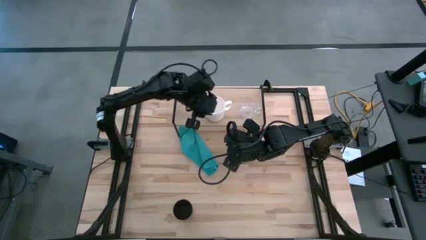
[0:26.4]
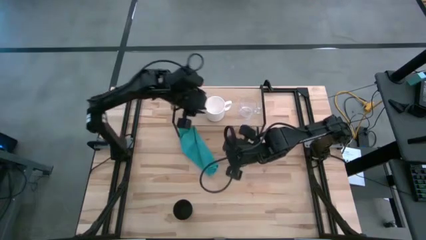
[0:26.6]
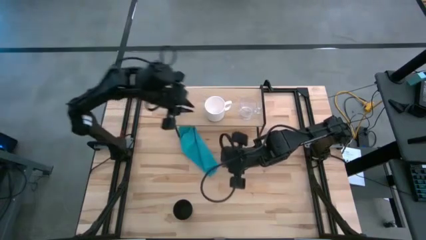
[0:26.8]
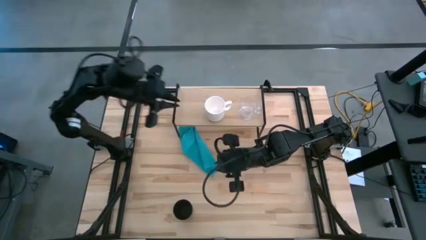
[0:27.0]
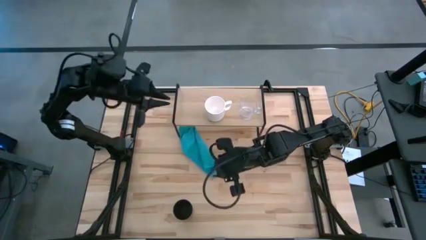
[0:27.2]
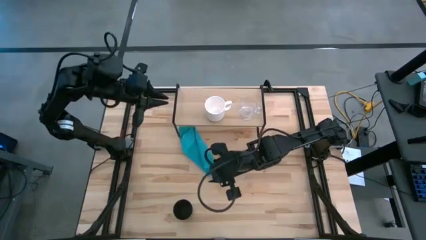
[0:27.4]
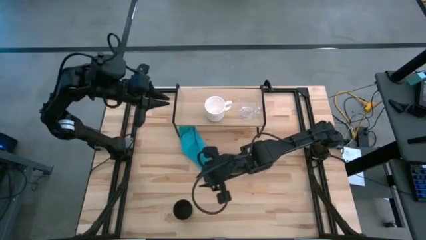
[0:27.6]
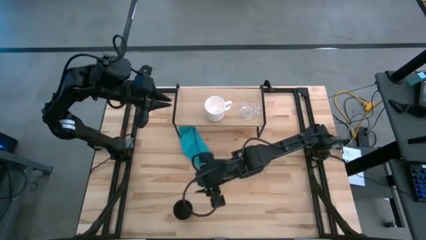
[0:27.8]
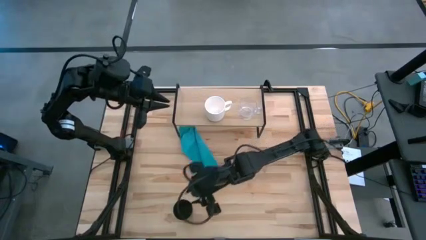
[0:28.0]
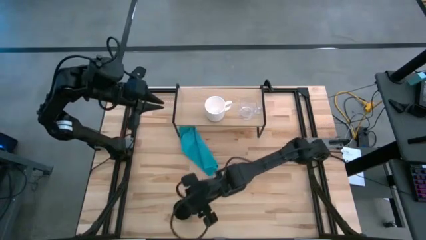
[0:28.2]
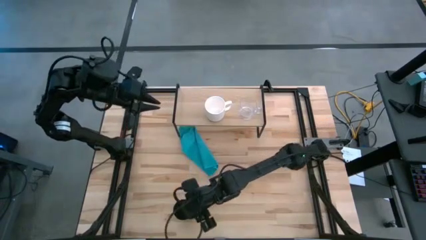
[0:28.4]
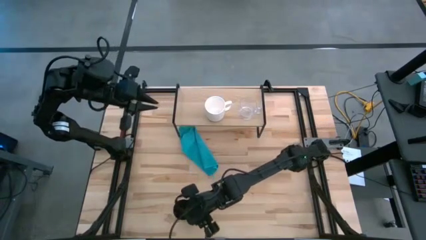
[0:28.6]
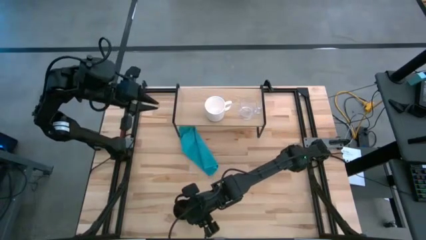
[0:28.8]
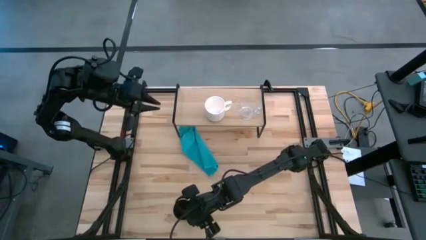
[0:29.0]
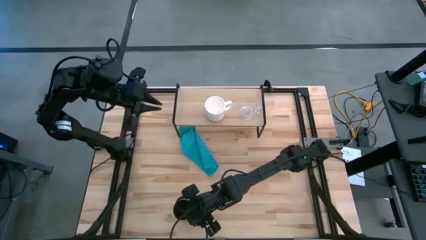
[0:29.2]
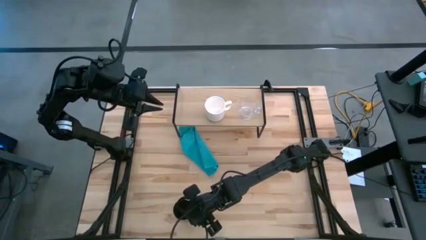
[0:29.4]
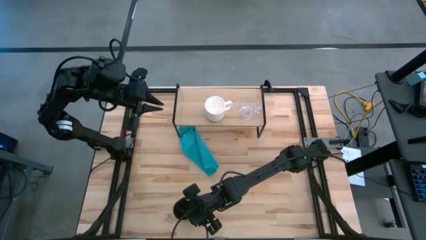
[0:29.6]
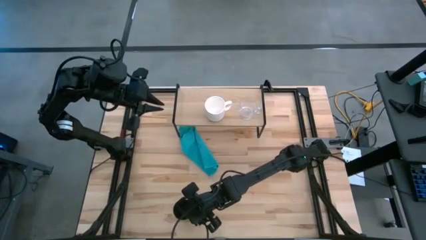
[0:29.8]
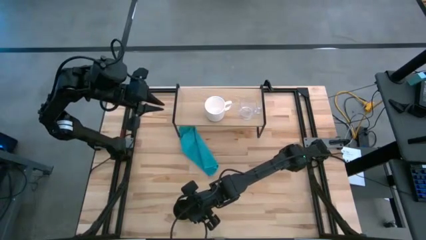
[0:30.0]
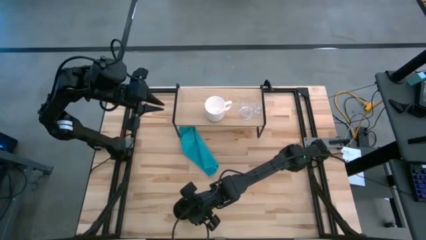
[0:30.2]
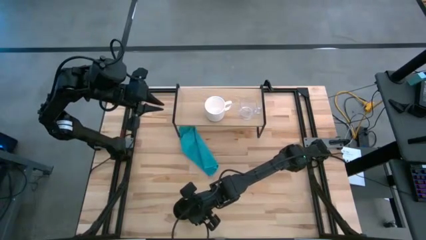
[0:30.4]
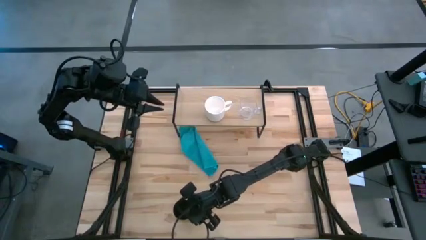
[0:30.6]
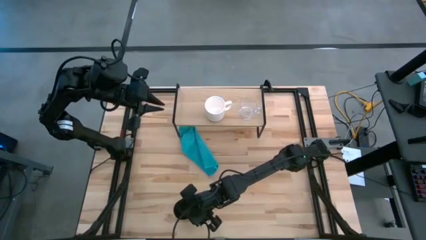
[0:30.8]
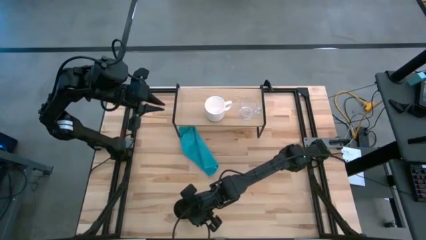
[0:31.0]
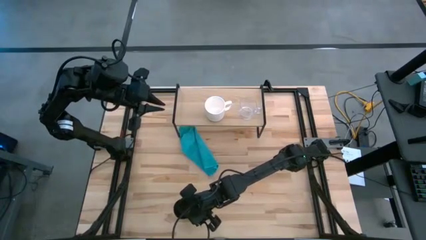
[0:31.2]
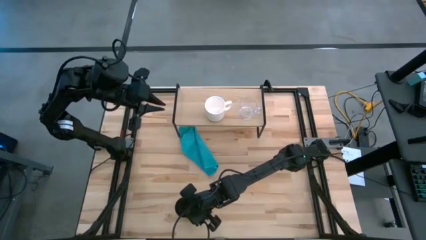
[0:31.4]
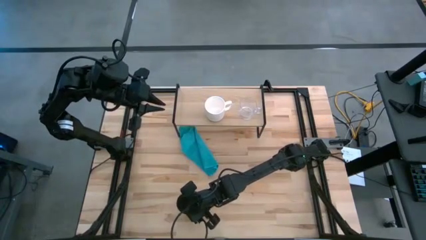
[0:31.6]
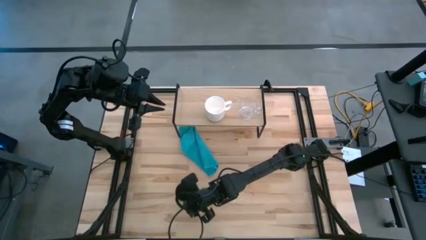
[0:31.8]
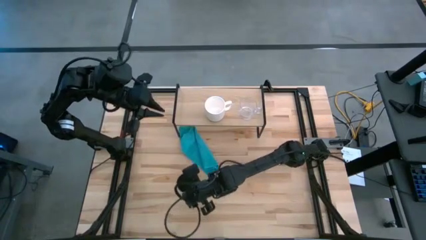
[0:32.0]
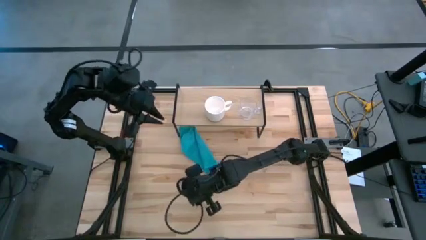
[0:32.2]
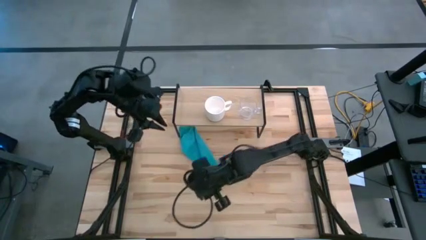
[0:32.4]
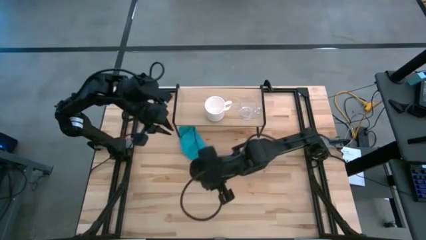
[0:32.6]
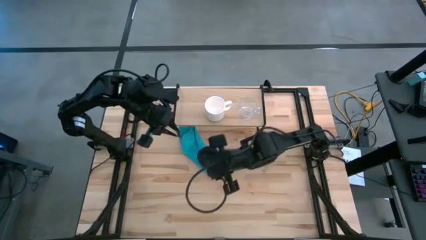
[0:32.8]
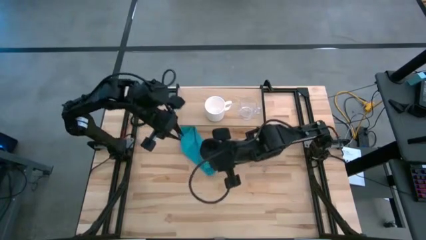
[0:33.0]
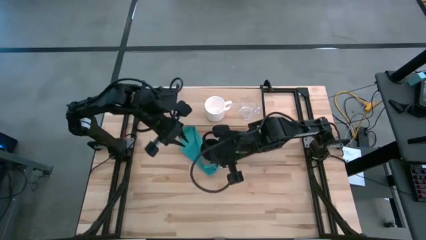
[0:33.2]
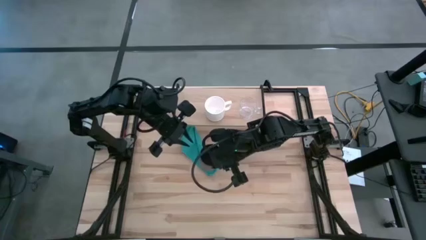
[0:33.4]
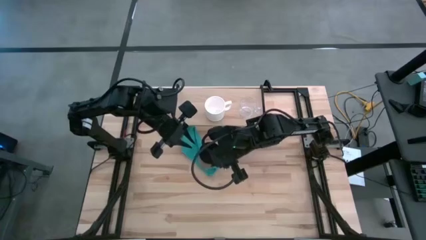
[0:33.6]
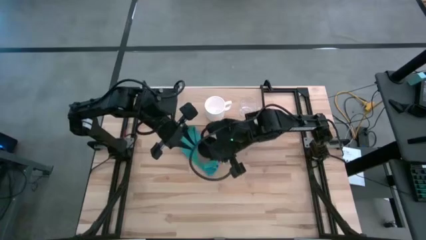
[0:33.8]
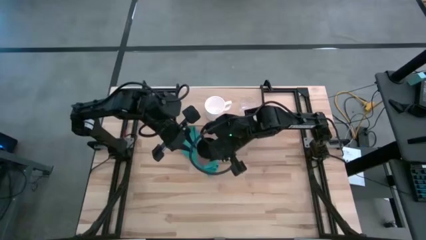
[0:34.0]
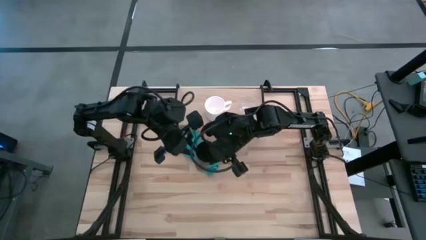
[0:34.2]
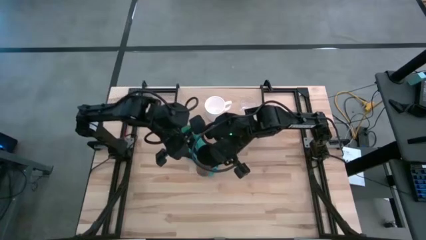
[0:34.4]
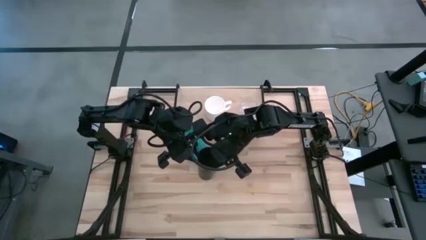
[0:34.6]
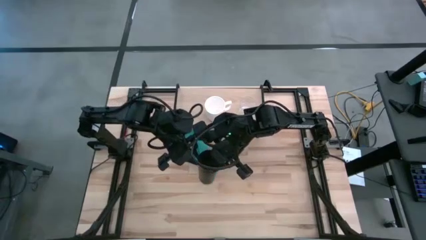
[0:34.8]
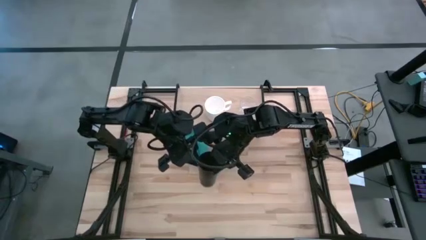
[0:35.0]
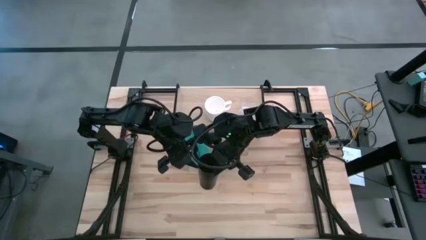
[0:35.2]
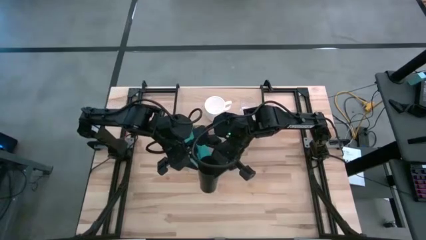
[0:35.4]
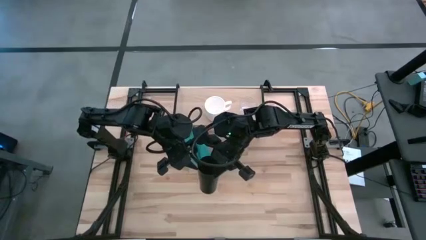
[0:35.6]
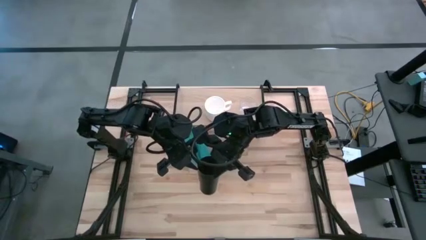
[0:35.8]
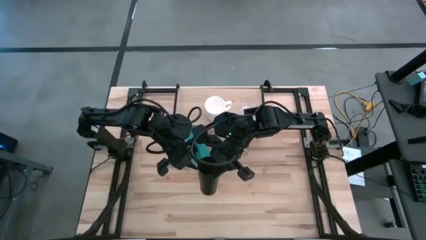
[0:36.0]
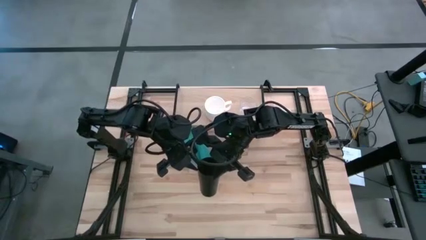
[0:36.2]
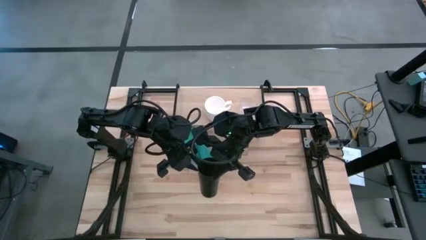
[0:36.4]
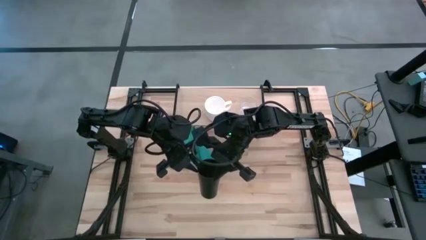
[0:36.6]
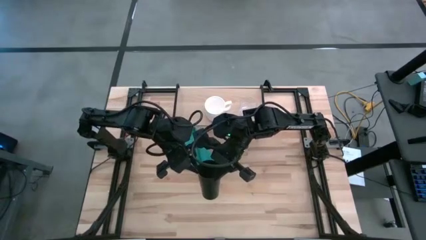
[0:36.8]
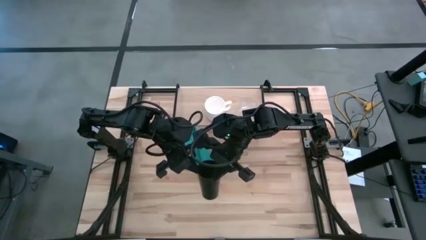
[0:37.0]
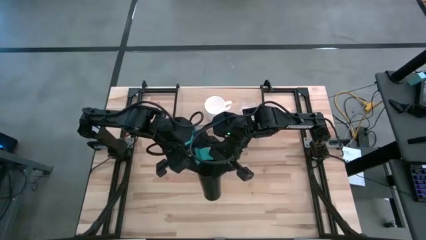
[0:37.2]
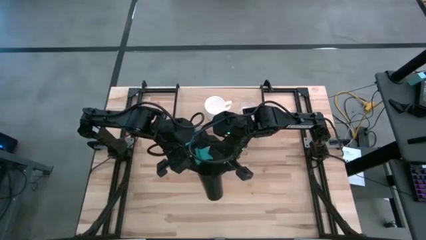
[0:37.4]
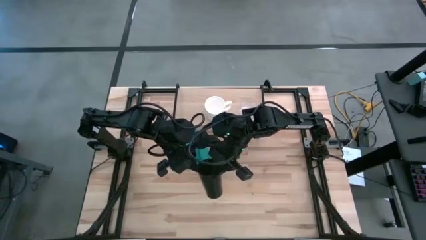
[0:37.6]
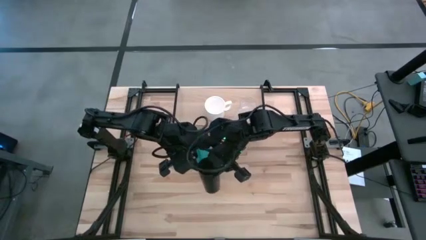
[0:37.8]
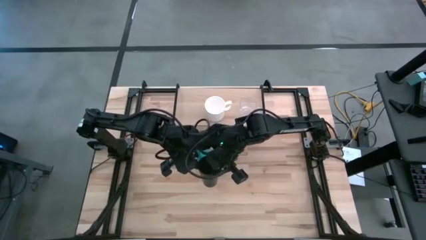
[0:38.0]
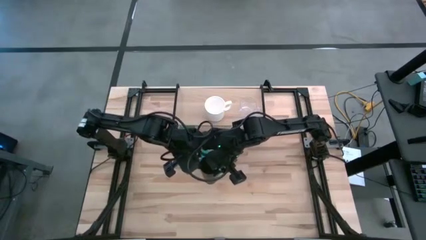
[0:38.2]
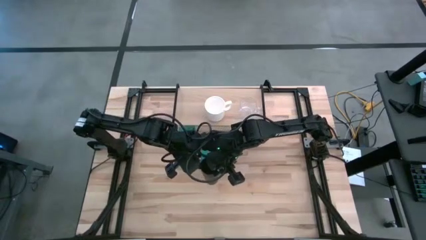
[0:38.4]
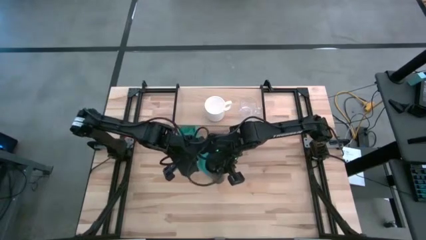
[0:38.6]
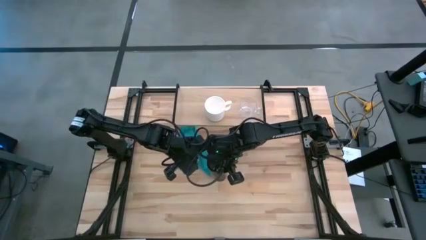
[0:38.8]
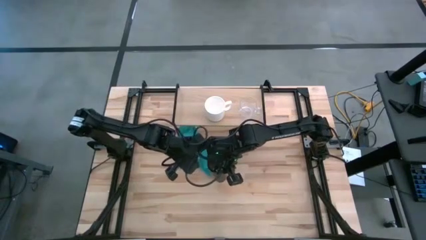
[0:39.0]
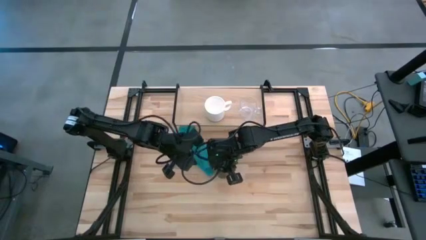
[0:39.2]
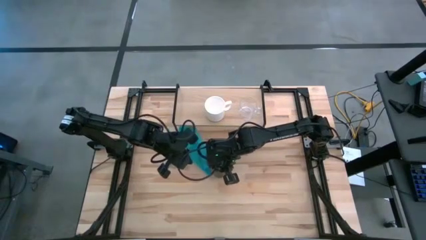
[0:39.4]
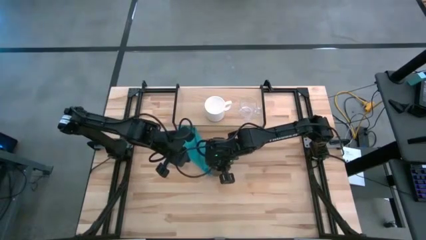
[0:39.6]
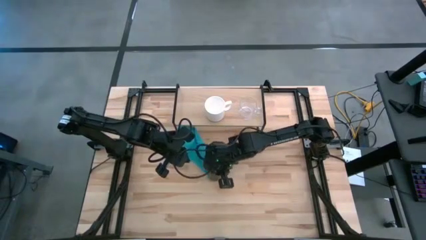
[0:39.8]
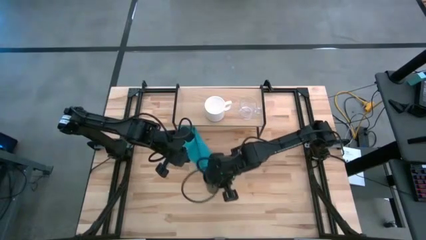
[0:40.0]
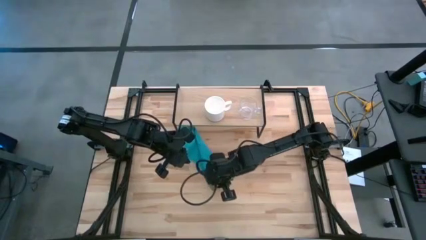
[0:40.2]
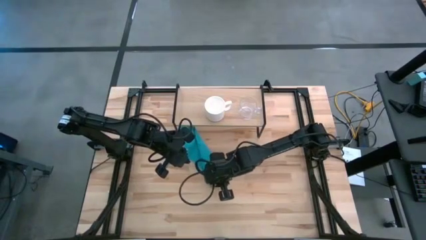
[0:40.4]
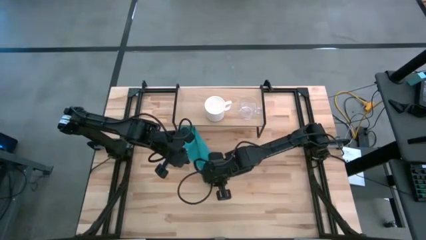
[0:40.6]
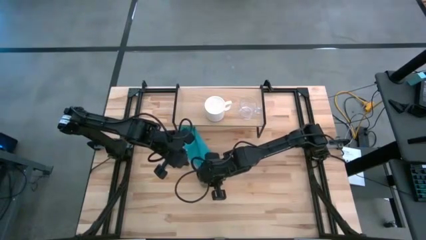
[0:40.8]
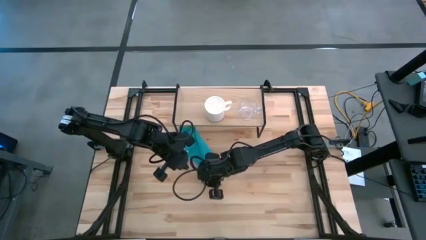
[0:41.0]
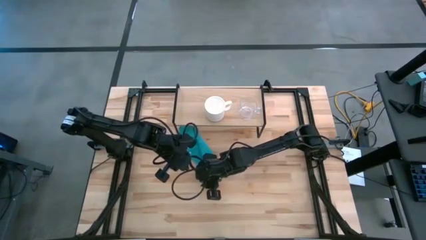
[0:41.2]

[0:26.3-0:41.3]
Task: Stack small to large cups/mugs on shelf
Put the black cup on the shelf
